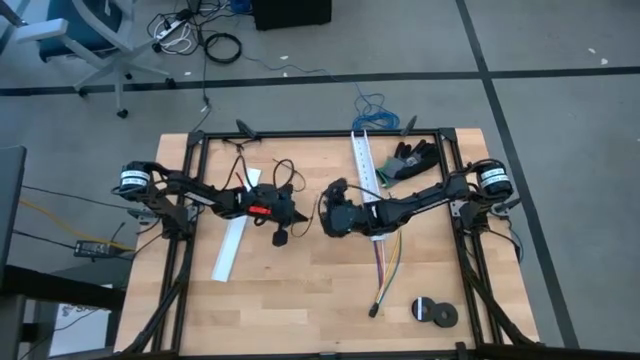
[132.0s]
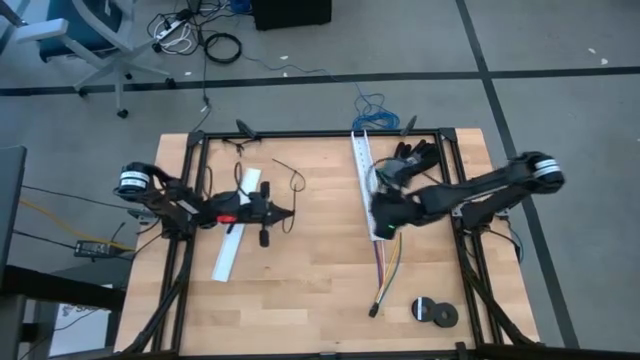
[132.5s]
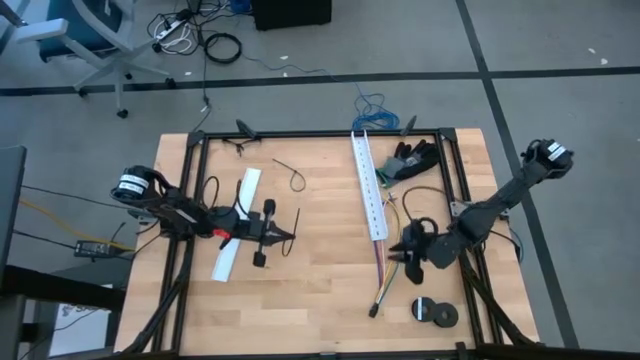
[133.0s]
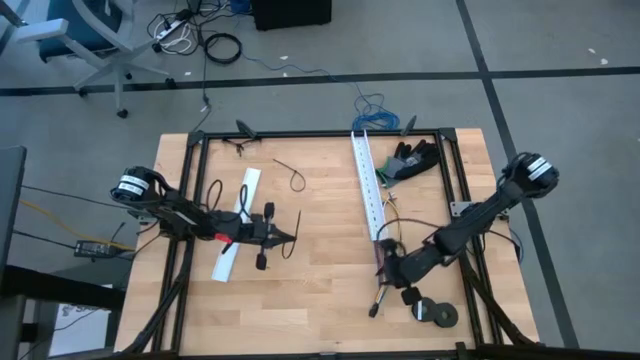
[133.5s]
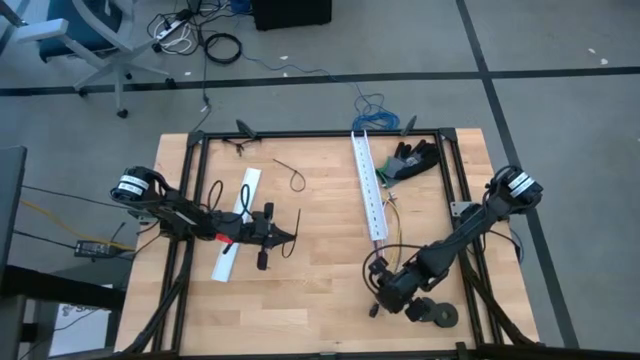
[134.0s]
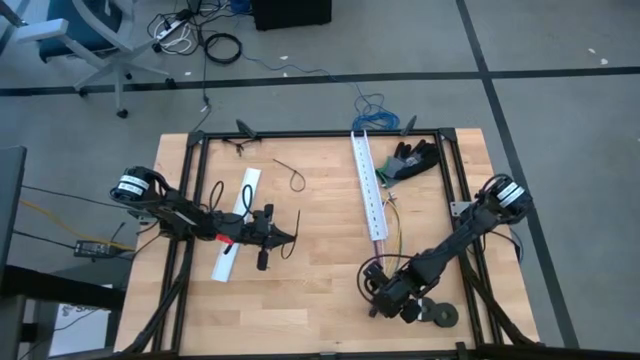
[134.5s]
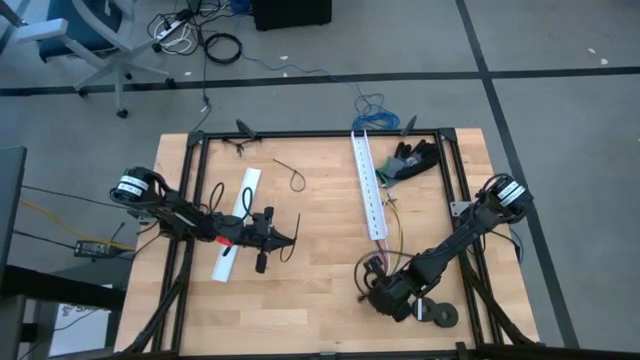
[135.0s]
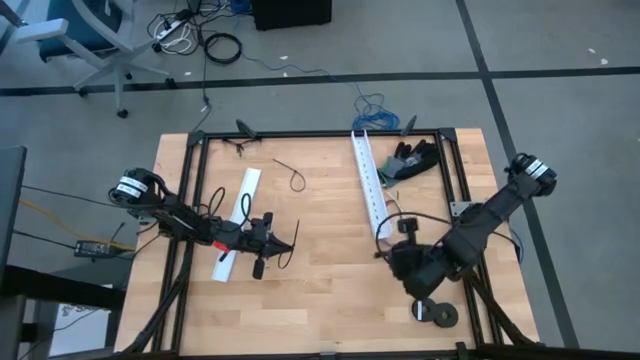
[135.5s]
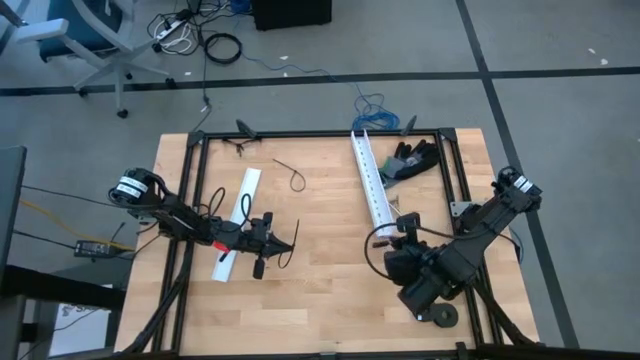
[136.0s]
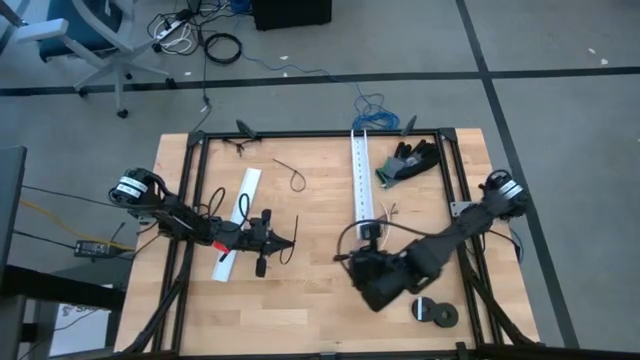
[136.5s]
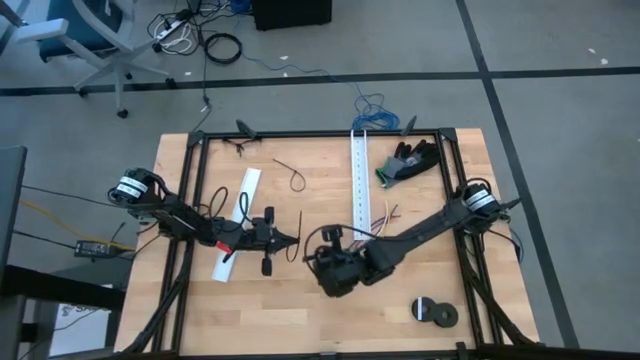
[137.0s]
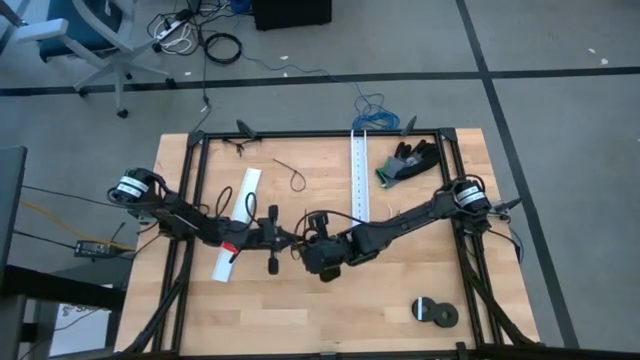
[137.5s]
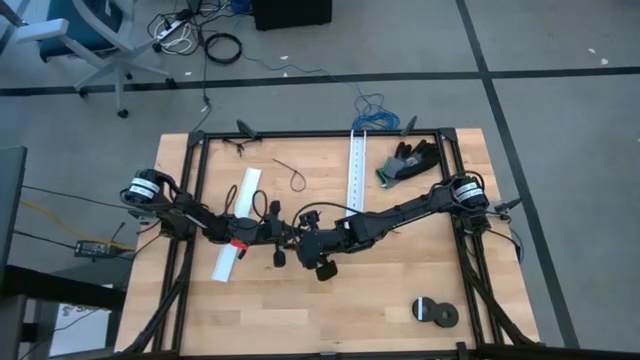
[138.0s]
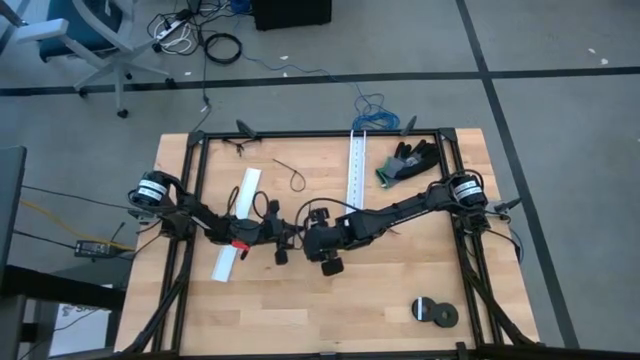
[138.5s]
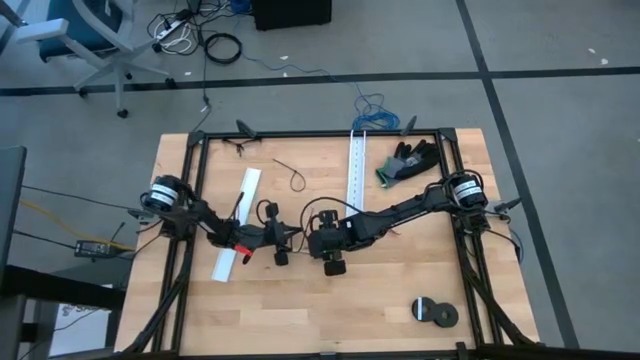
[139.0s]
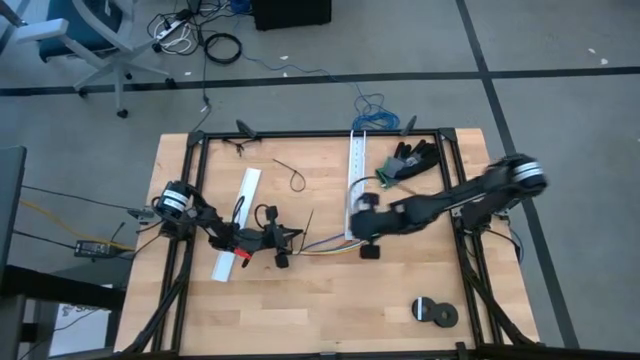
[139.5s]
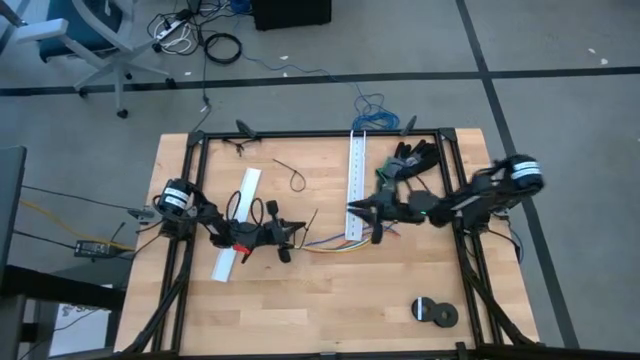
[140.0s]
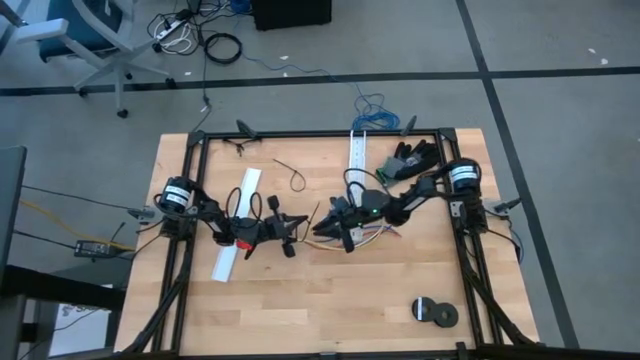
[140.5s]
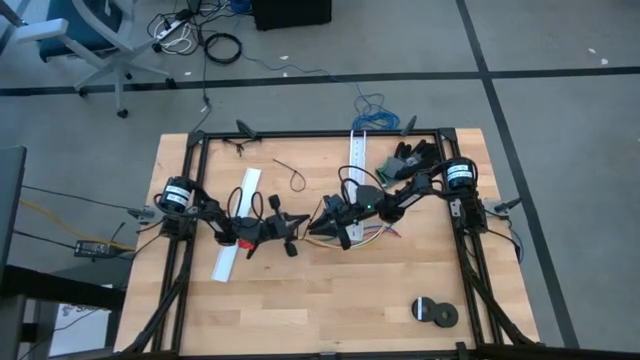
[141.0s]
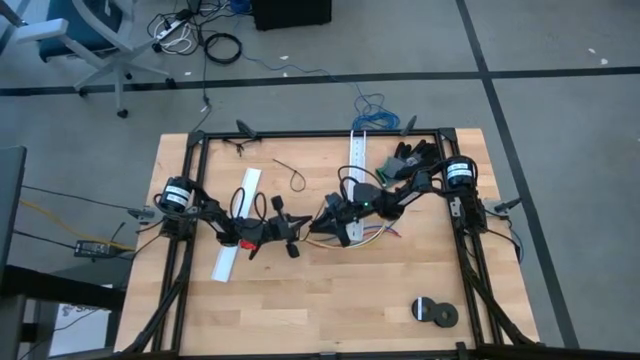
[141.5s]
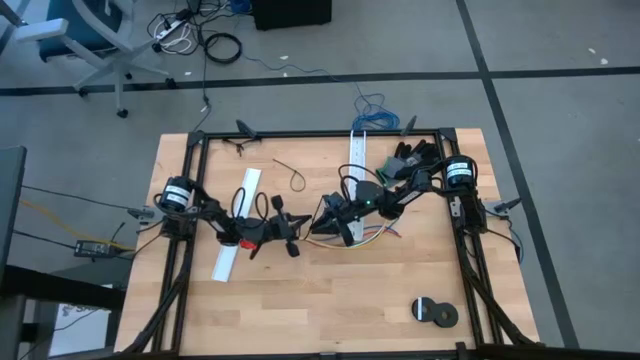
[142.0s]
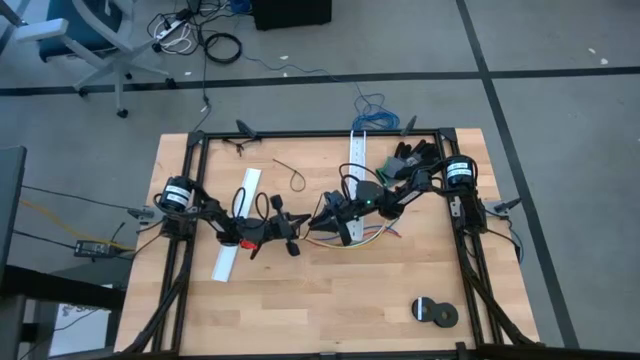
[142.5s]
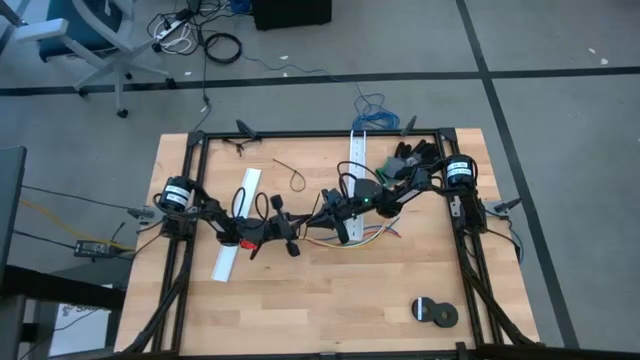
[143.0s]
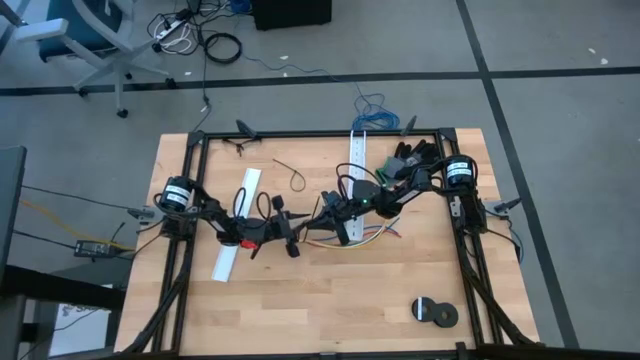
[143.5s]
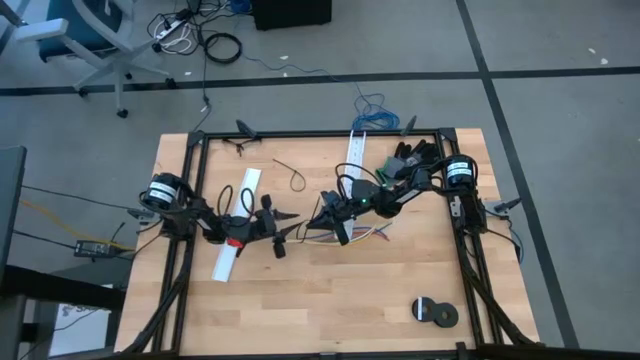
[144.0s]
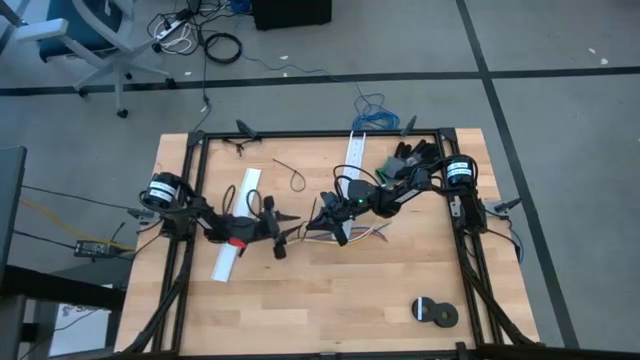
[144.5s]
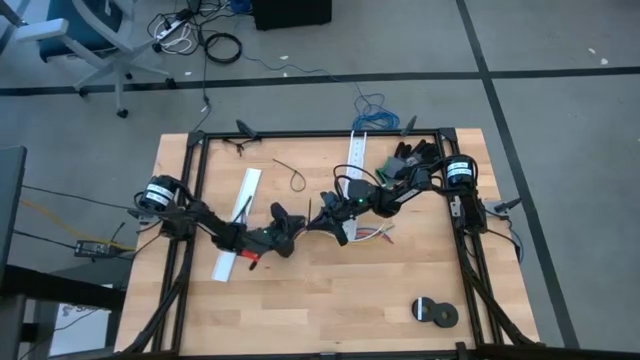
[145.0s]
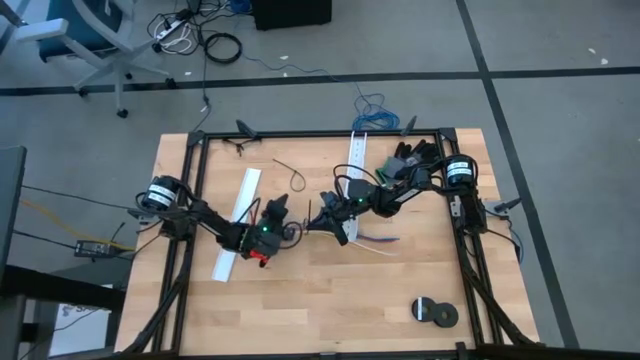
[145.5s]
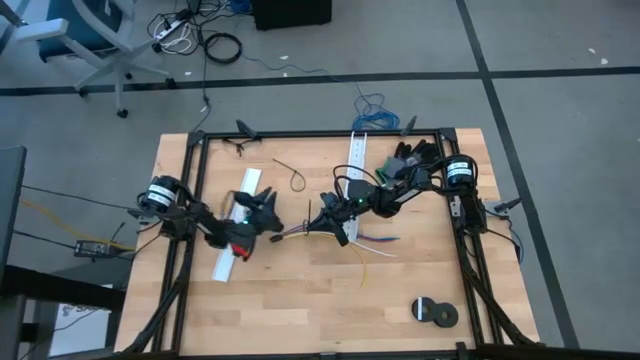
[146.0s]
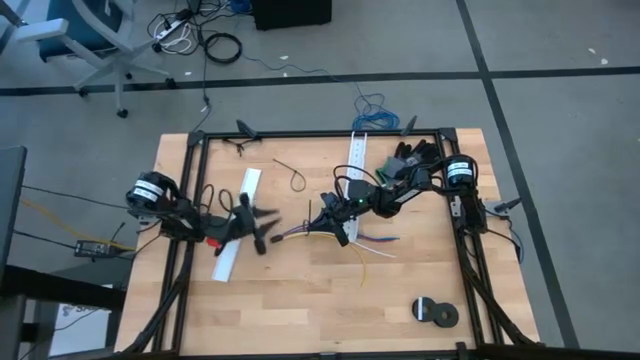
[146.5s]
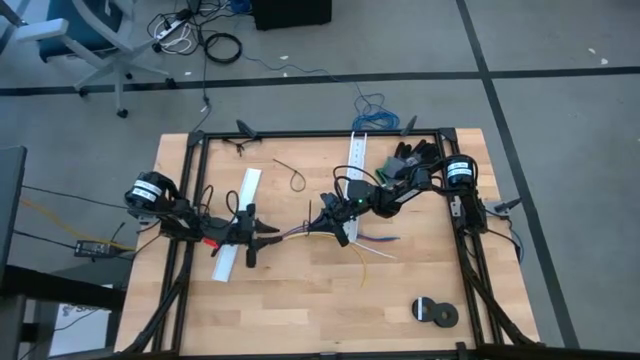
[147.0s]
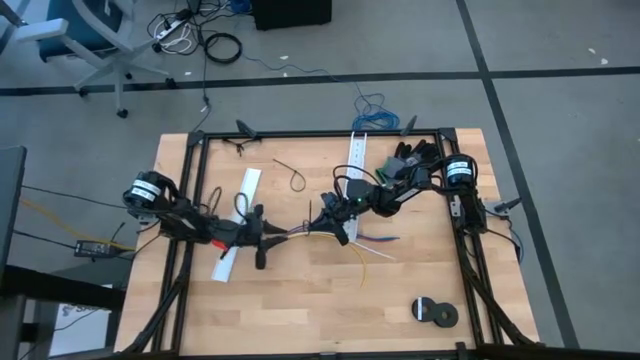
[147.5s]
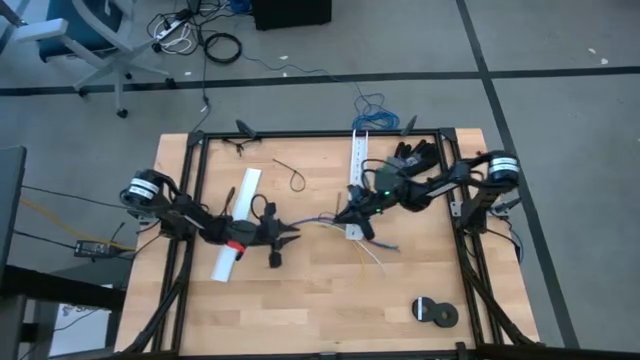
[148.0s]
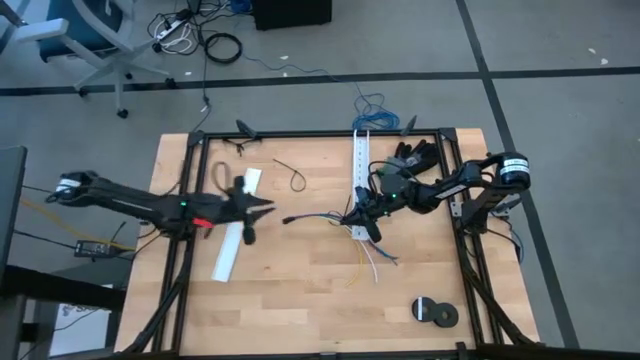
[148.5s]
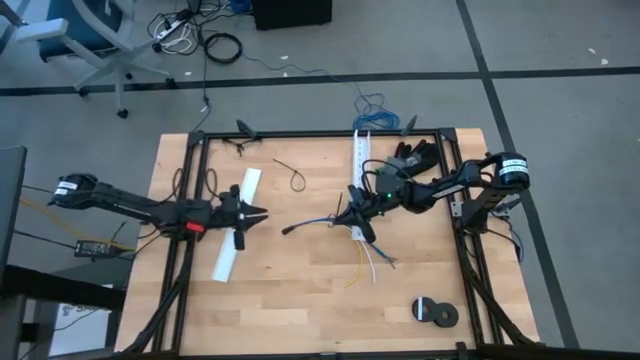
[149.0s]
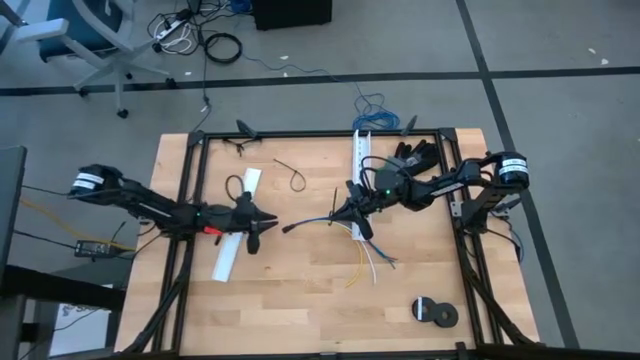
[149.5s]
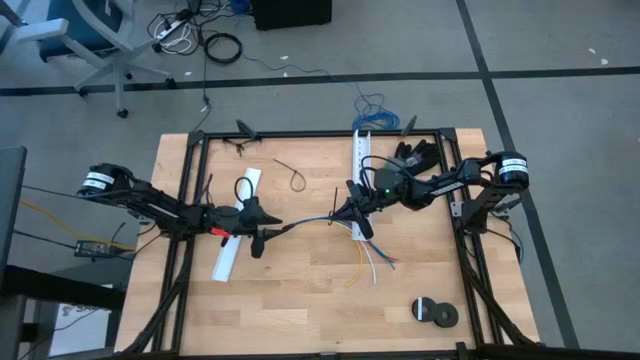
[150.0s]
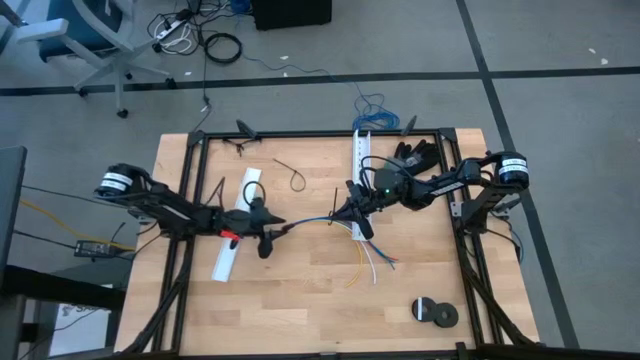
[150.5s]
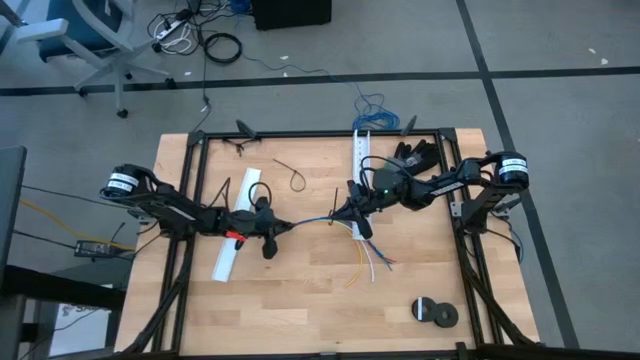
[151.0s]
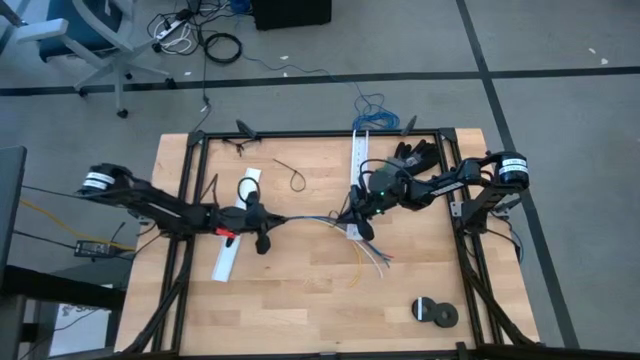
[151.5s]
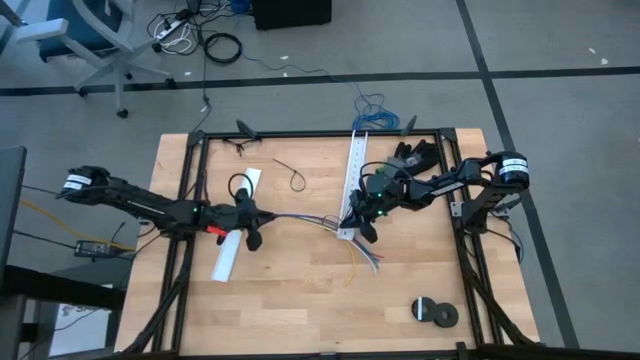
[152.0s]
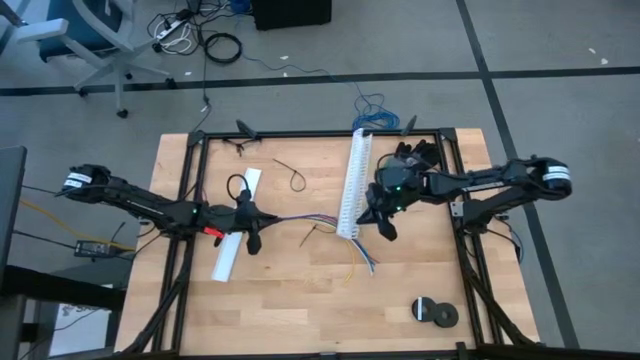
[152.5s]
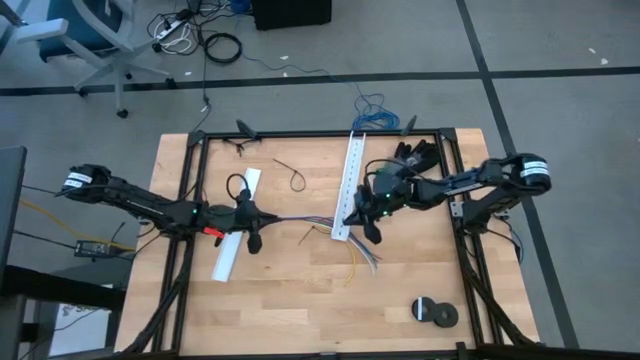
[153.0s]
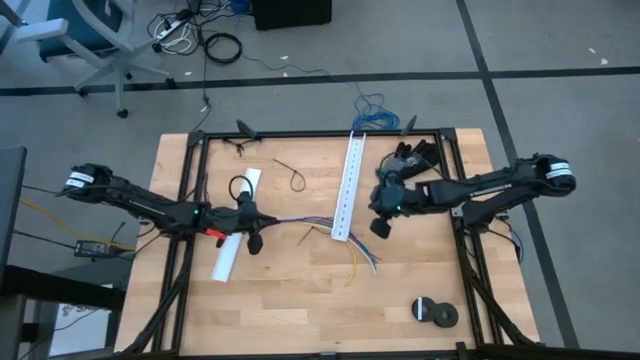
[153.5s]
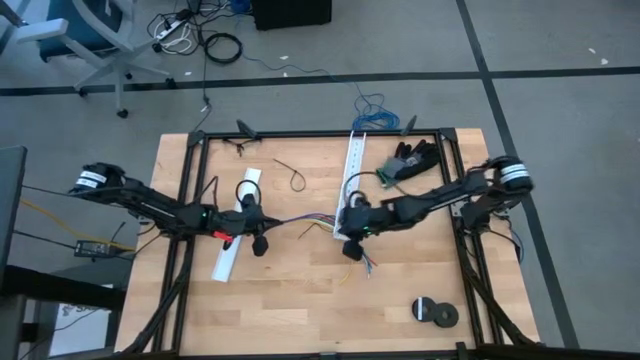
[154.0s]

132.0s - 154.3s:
Task: Ziptie cables
Wrap the cable wires with black zip tie

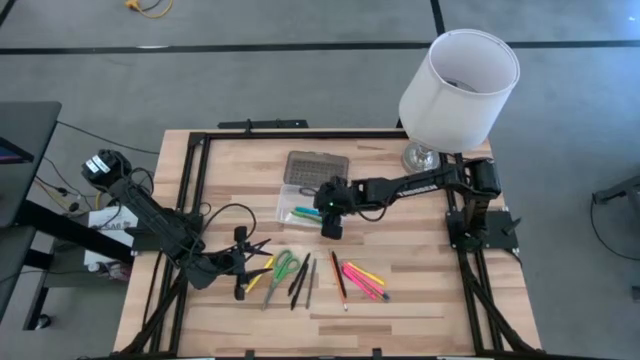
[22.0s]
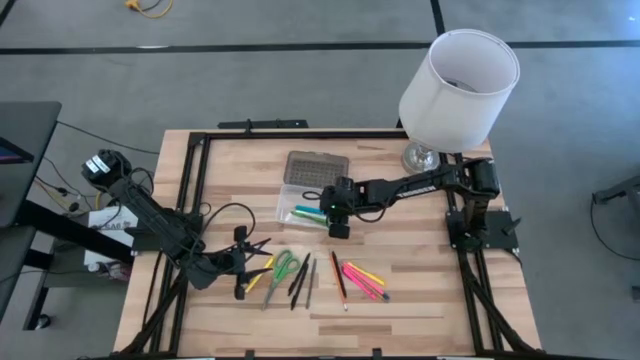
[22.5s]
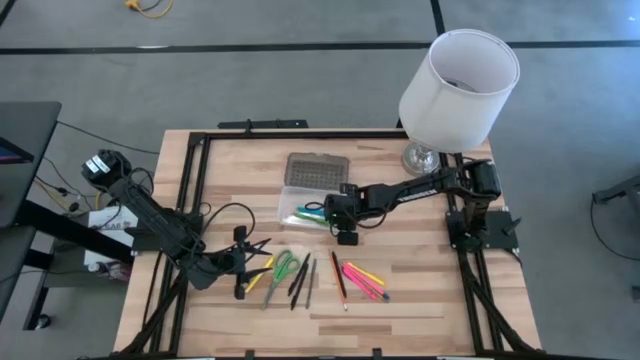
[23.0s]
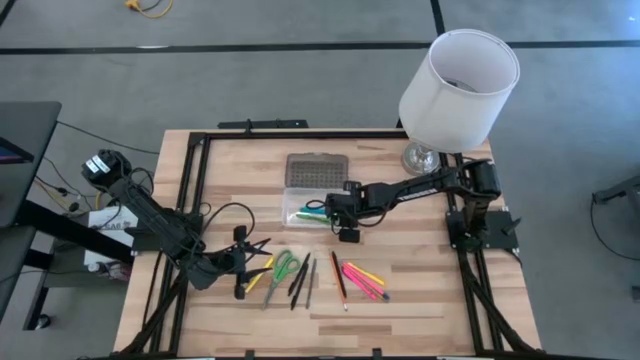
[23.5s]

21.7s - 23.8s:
Task: Pick & place school supplies into a supply box
Adjust the black supply box
